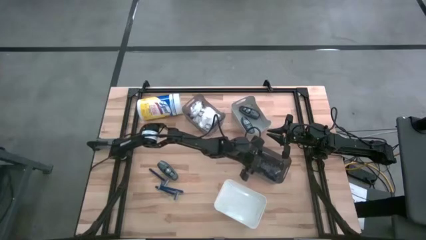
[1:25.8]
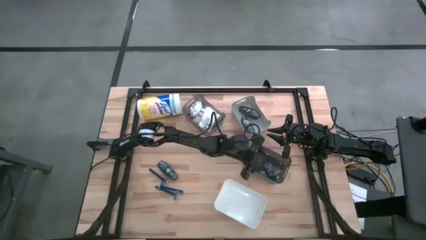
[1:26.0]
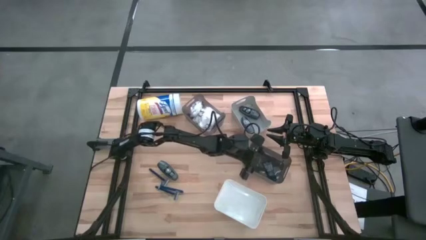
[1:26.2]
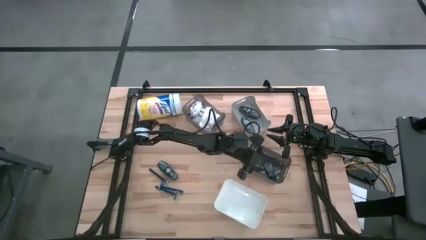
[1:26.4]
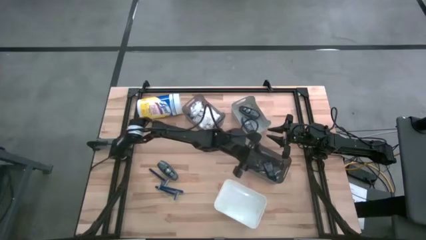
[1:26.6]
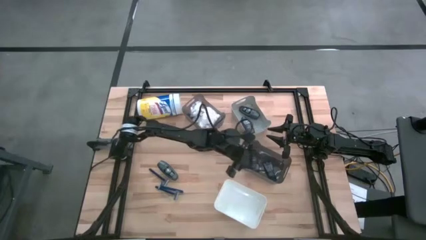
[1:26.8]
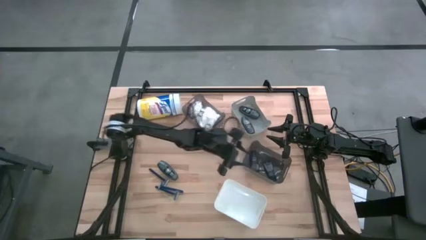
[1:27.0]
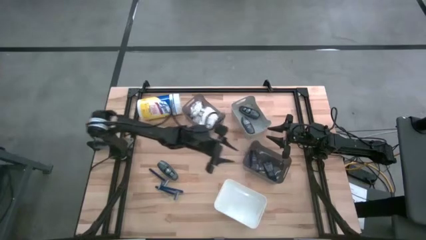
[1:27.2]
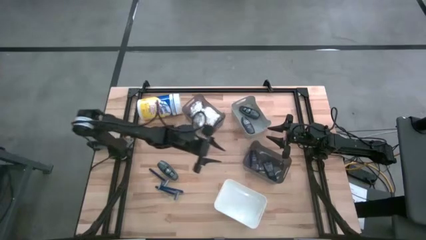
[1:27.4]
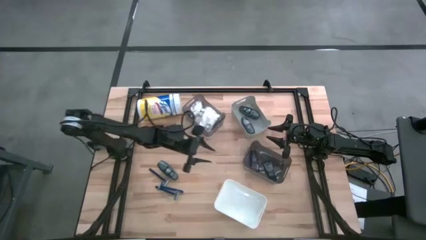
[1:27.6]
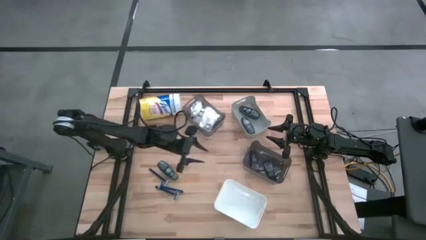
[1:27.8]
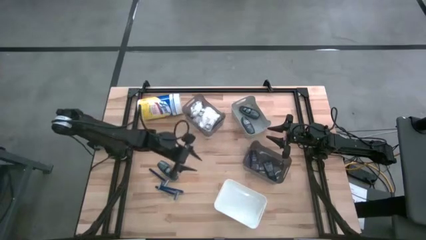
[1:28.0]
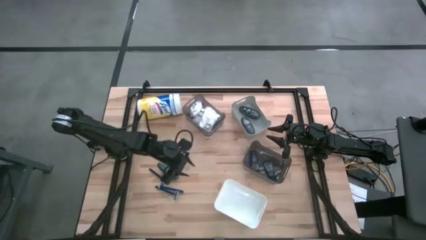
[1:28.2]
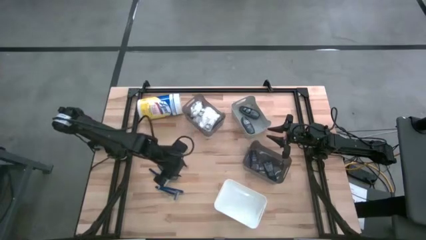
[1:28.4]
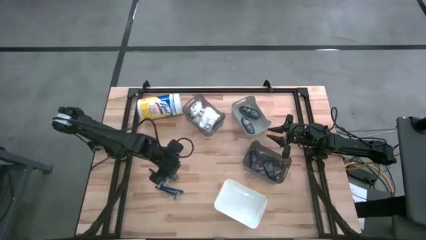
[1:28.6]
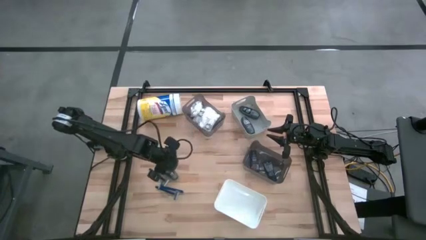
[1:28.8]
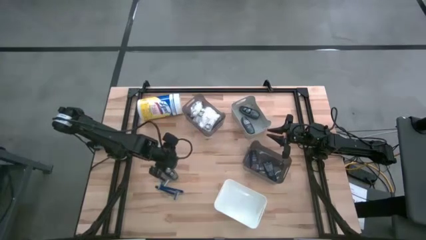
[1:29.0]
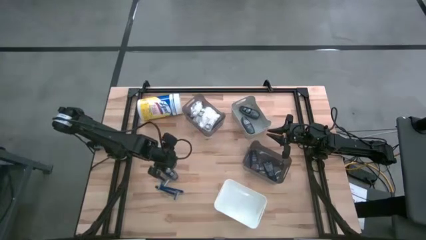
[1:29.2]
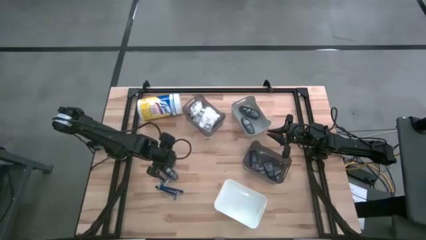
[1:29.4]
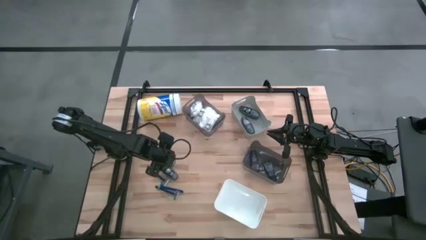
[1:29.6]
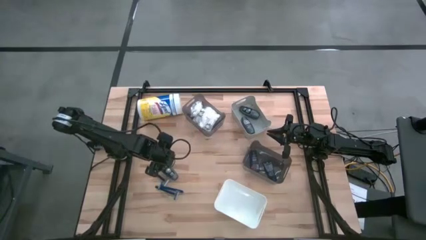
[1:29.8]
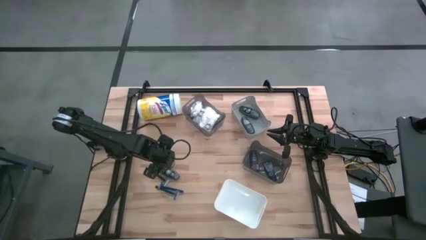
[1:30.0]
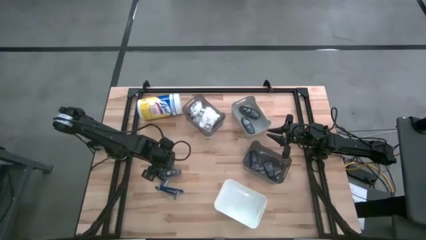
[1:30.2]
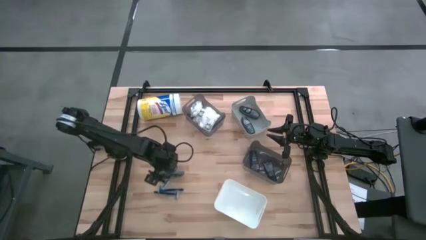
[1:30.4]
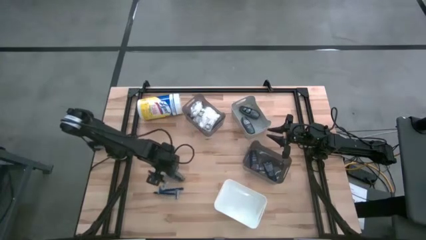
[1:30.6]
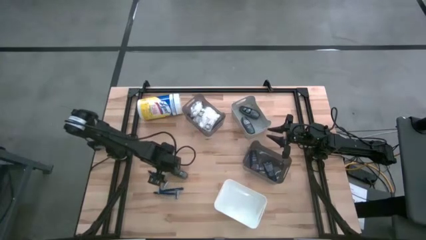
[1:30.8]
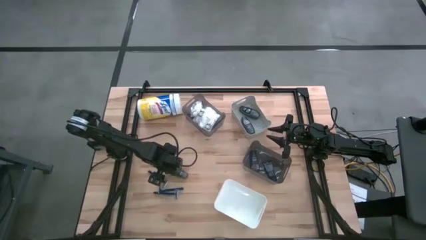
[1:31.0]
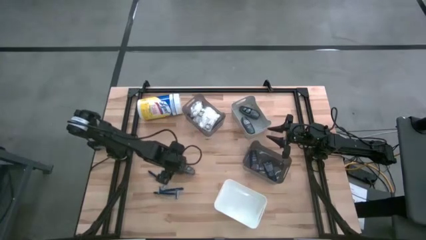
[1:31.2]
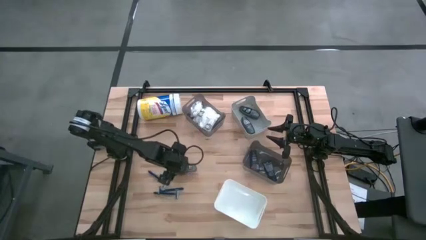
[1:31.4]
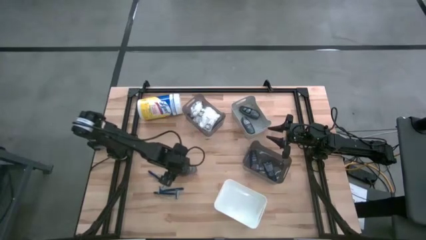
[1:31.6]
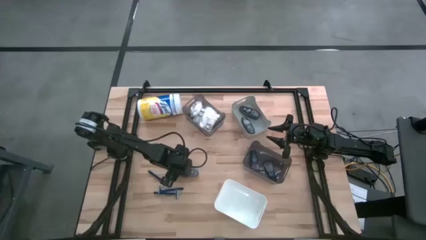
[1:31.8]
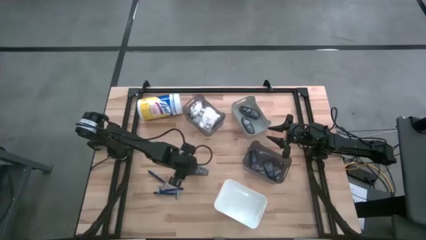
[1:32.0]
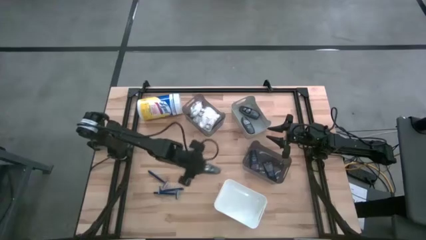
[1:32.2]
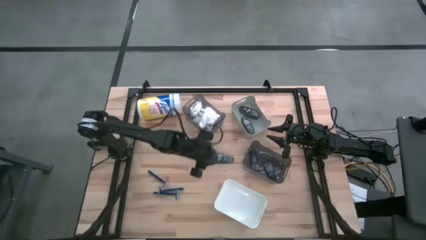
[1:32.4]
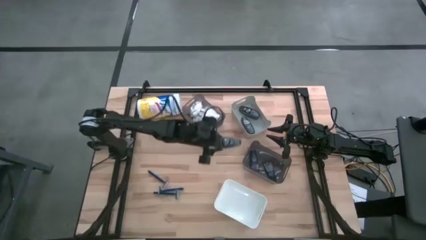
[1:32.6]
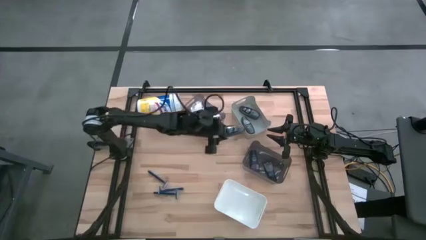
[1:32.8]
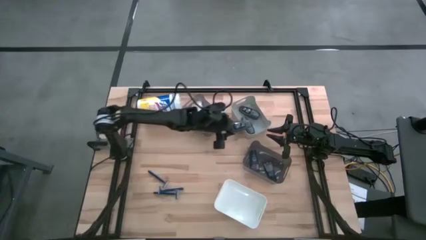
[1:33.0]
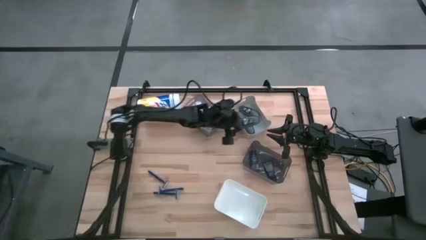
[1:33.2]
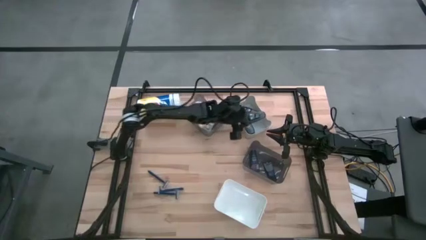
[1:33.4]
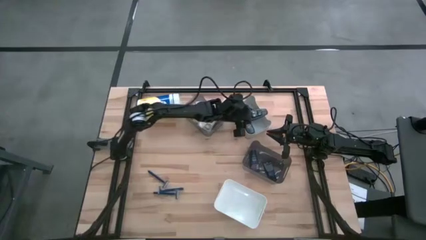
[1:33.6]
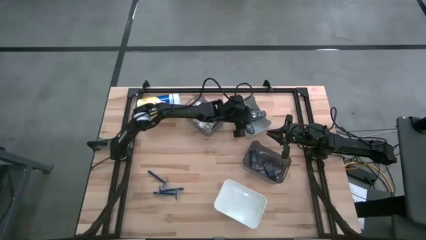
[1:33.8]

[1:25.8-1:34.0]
Task: Pick & Place Travel size toiletries
Put the gray deodorant into the gray bin

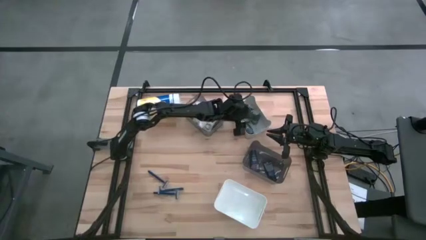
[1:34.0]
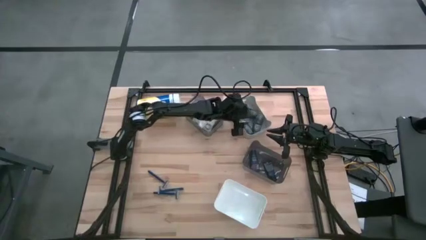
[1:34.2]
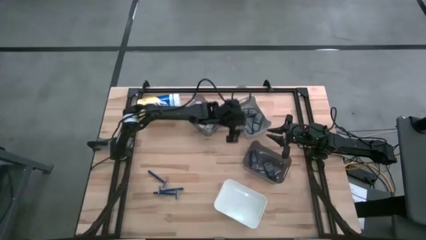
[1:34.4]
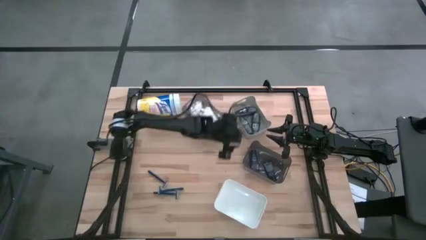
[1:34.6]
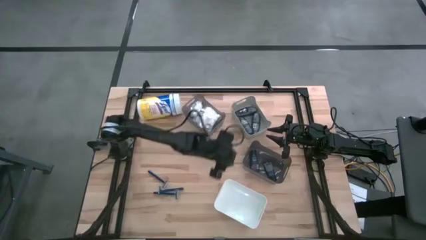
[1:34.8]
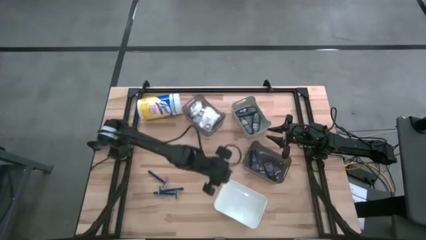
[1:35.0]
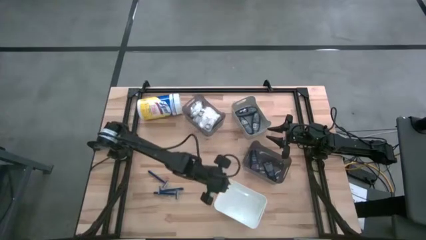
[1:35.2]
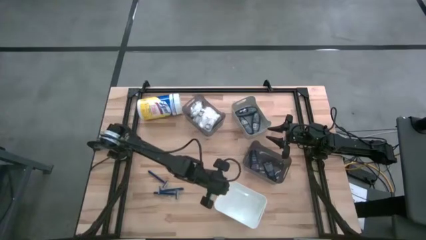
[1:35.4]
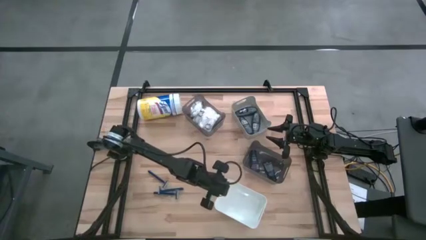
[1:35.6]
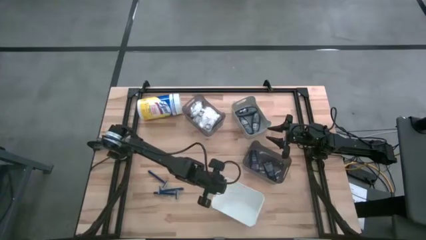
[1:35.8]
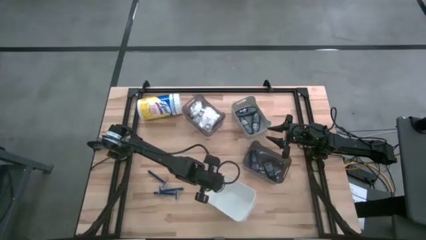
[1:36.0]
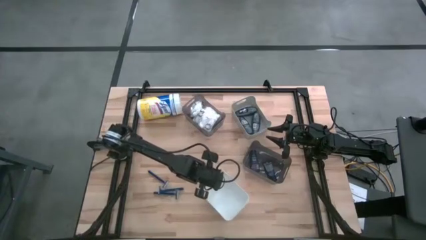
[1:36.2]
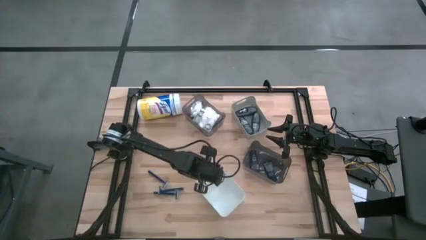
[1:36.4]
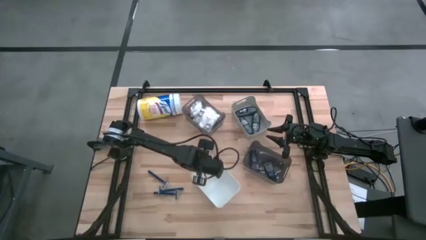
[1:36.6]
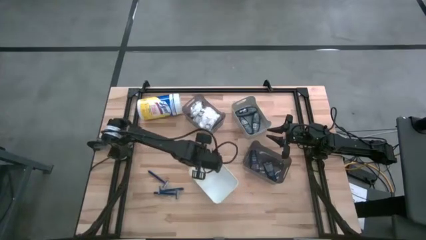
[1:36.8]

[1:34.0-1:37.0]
Move the white bin to the center of the table

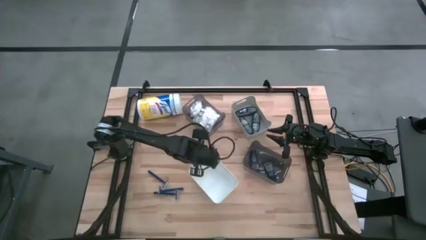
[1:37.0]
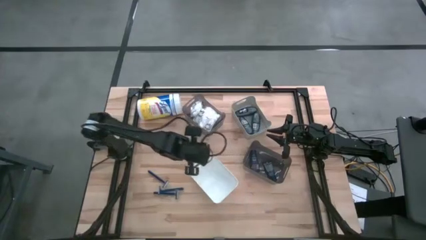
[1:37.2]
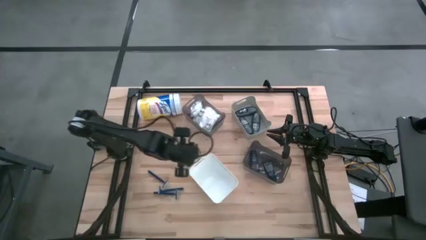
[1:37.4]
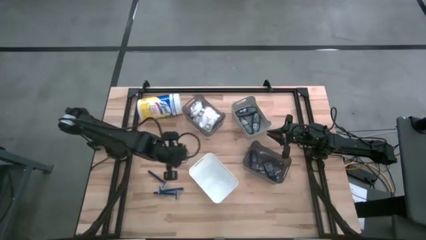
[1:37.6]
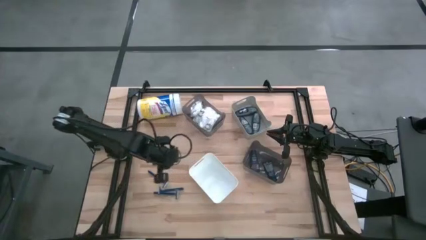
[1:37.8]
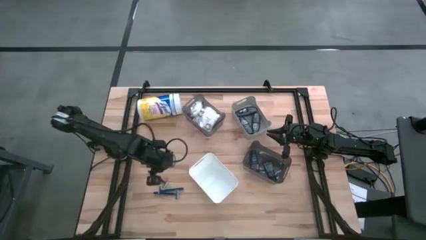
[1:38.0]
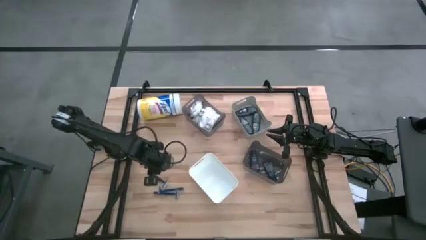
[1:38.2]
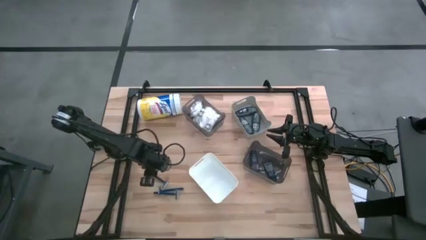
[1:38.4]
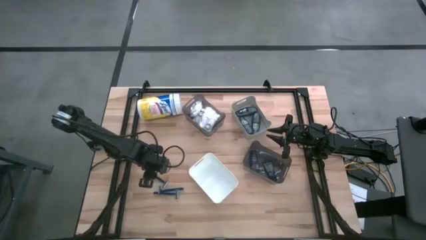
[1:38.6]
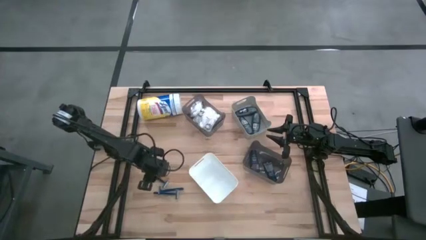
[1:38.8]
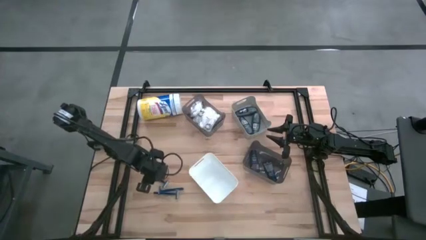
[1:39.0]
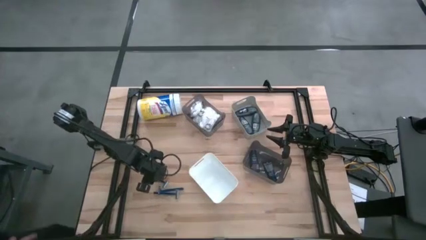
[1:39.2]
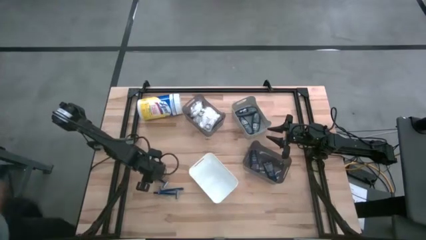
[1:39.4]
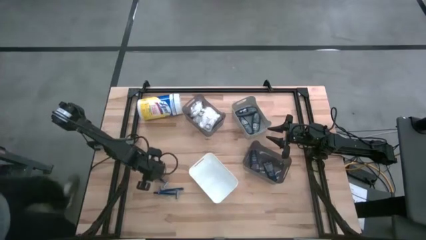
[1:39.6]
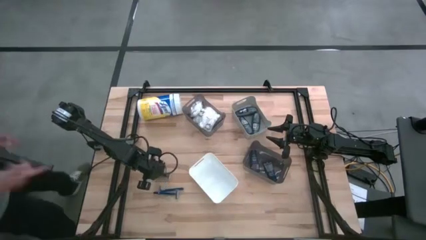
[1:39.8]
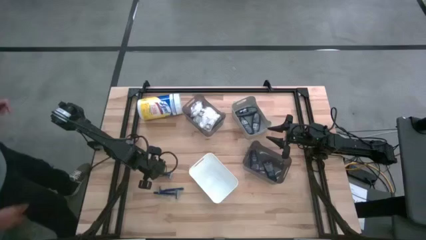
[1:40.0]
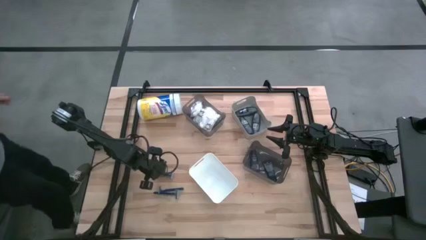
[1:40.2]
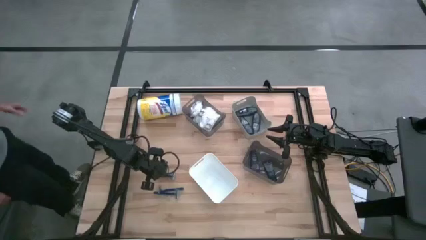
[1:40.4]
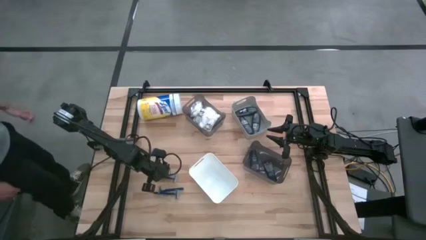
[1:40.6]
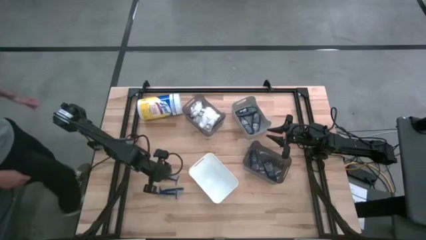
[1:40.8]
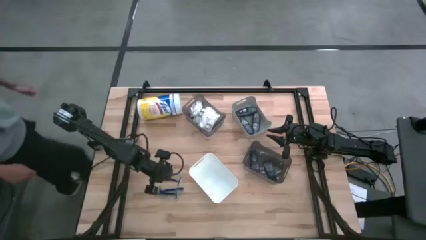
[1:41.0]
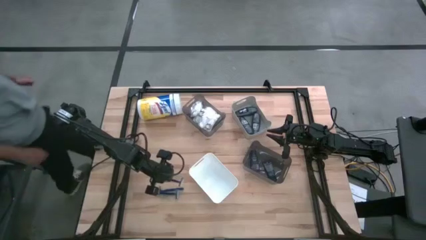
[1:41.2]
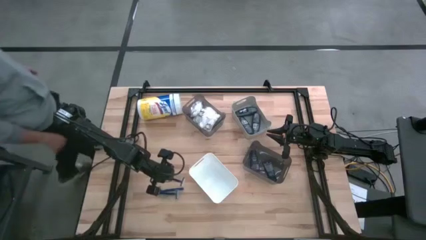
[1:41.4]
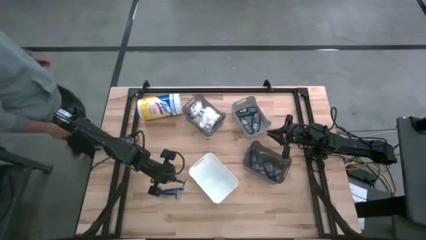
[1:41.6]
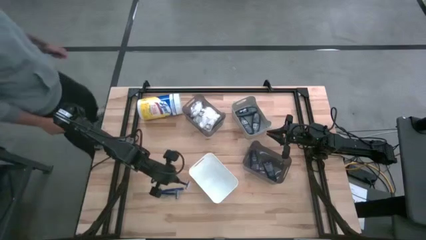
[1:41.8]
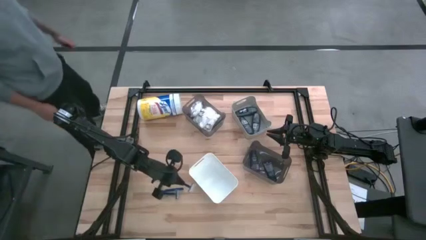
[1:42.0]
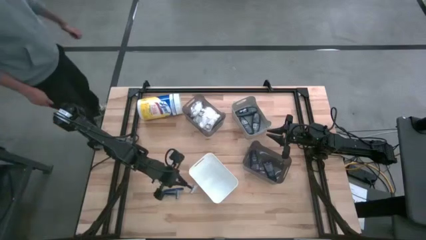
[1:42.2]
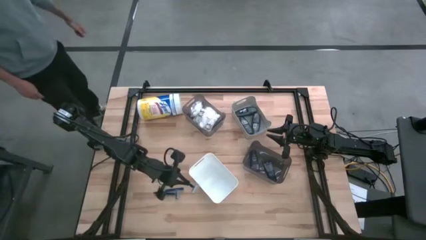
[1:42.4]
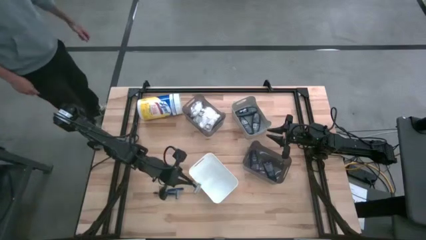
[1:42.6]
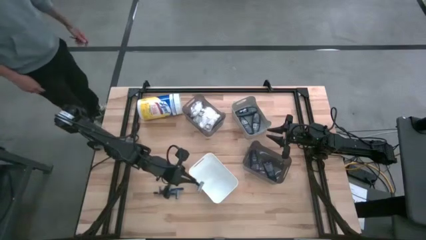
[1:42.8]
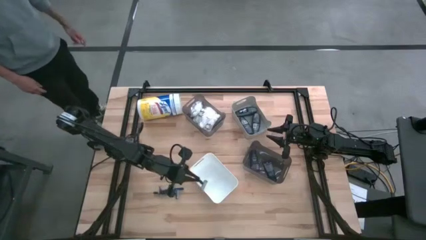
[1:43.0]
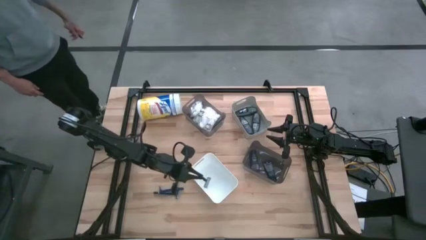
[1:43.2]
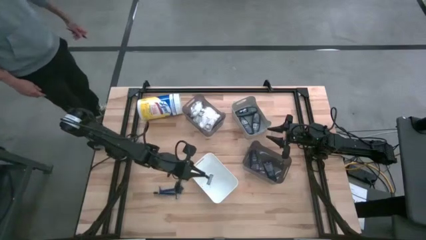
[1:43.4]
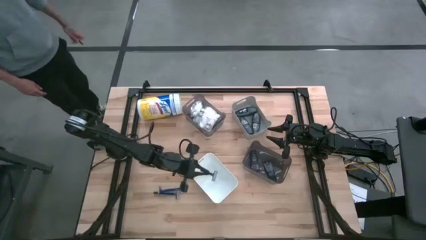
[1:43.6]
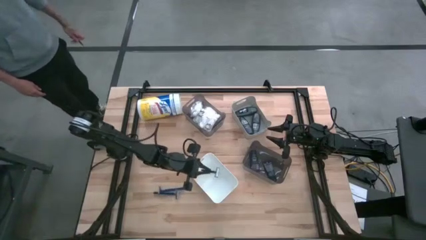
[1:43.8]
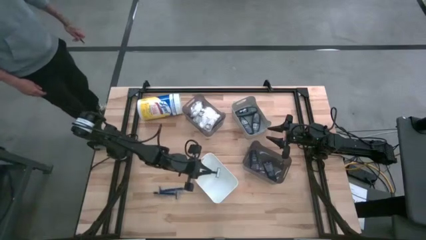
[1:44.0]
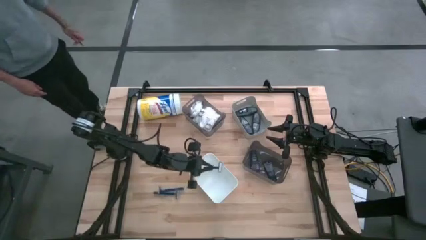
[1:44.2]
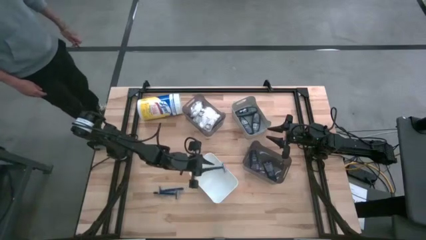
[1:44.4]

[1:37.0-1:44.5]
Put the blue razor into the white bin
